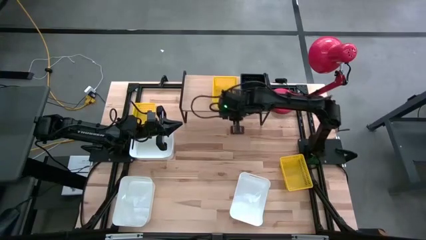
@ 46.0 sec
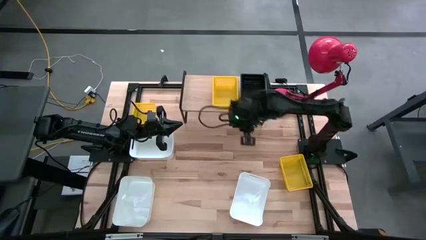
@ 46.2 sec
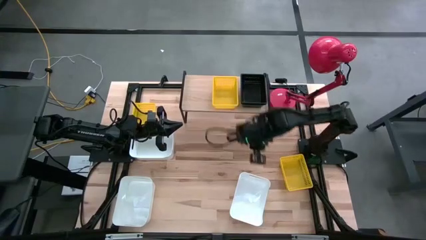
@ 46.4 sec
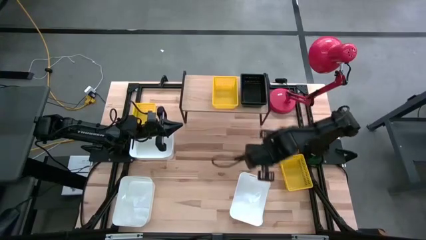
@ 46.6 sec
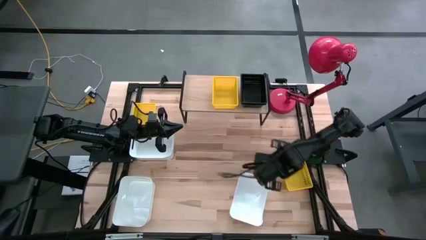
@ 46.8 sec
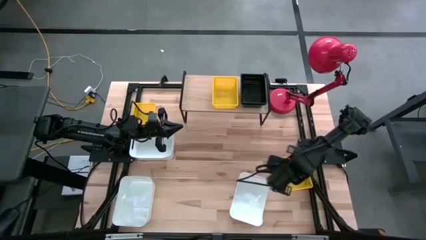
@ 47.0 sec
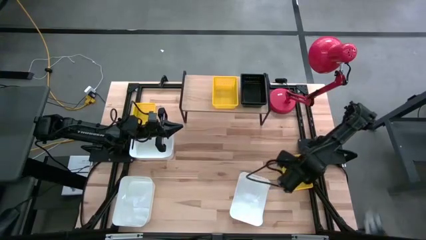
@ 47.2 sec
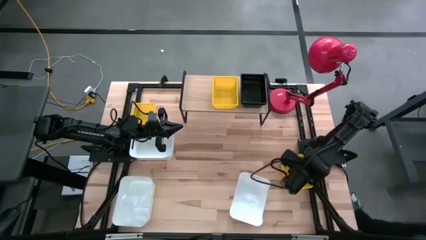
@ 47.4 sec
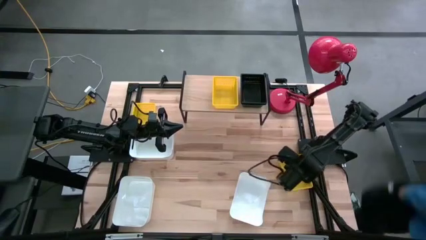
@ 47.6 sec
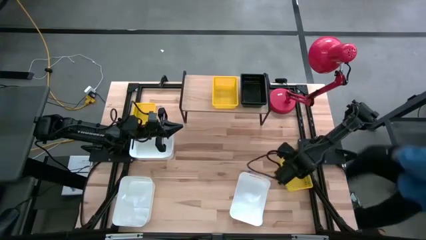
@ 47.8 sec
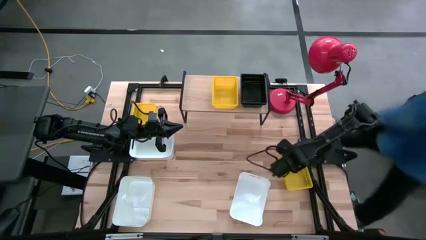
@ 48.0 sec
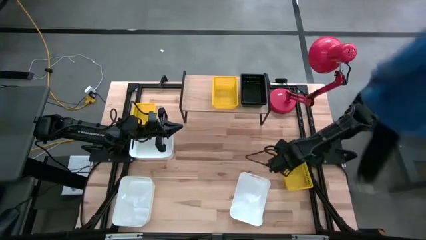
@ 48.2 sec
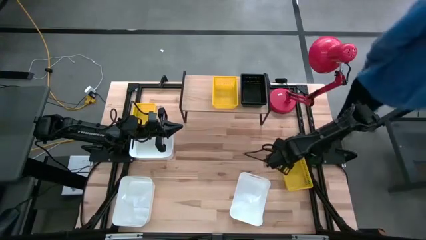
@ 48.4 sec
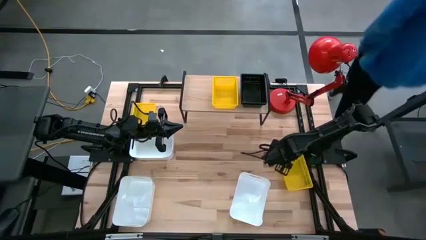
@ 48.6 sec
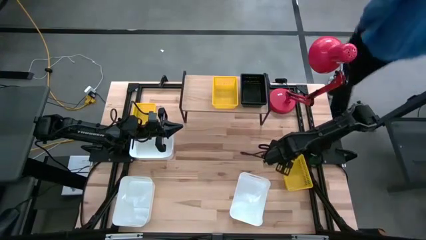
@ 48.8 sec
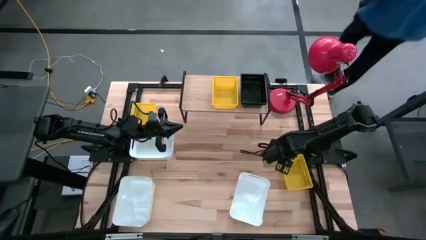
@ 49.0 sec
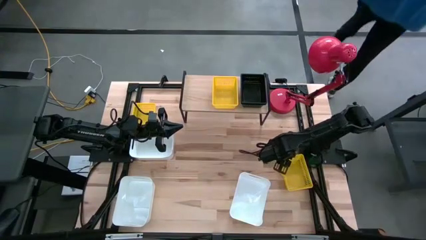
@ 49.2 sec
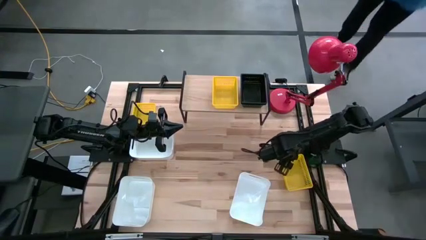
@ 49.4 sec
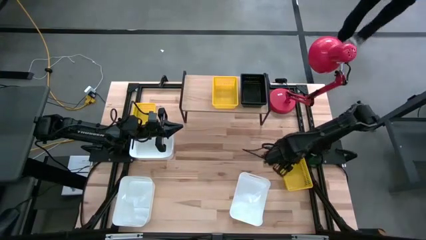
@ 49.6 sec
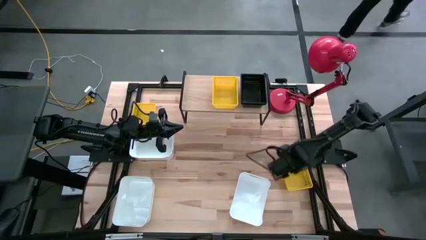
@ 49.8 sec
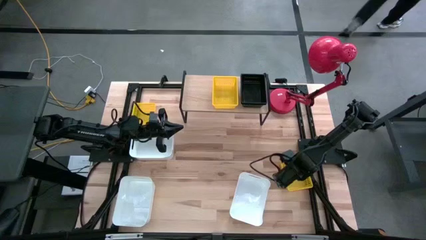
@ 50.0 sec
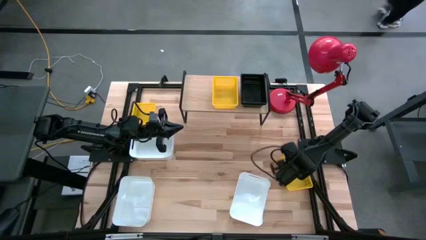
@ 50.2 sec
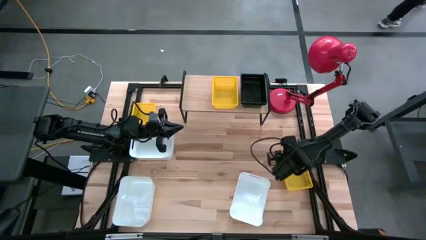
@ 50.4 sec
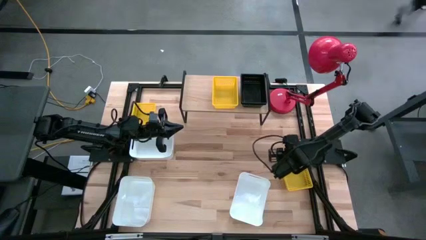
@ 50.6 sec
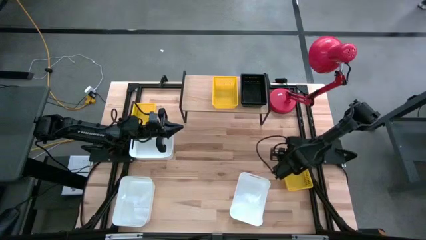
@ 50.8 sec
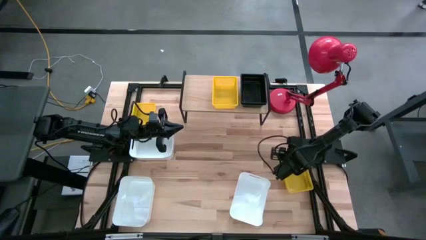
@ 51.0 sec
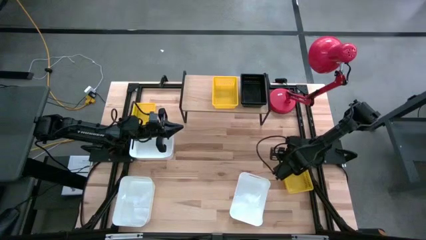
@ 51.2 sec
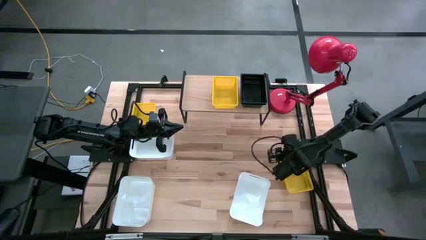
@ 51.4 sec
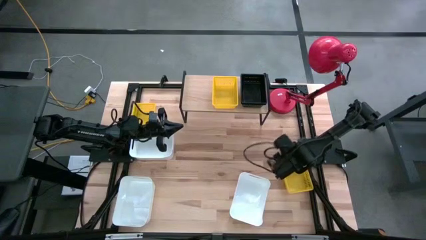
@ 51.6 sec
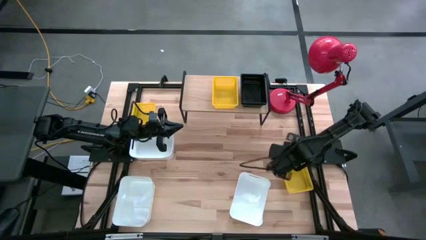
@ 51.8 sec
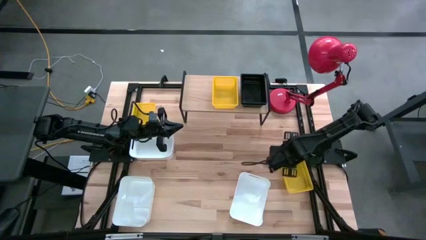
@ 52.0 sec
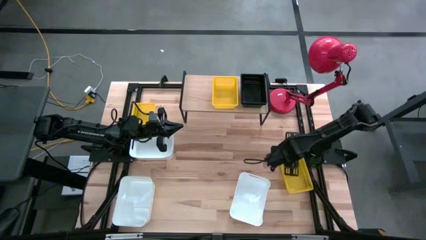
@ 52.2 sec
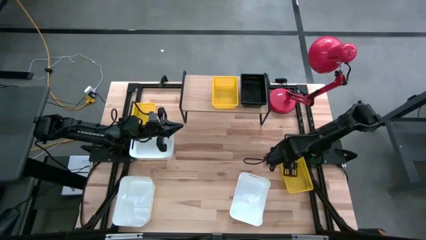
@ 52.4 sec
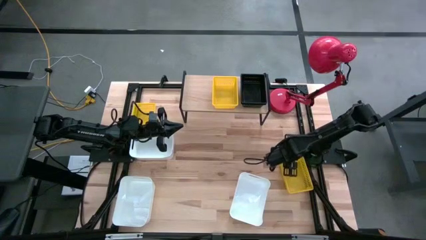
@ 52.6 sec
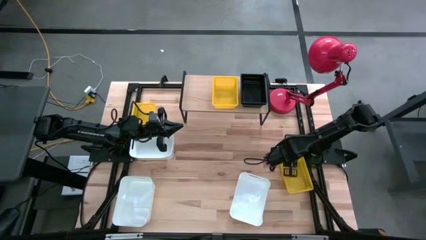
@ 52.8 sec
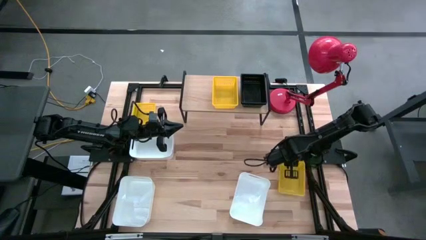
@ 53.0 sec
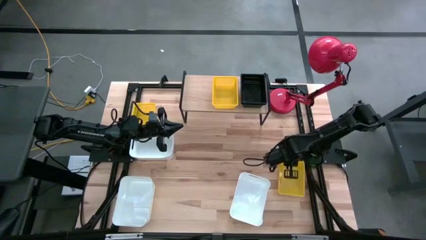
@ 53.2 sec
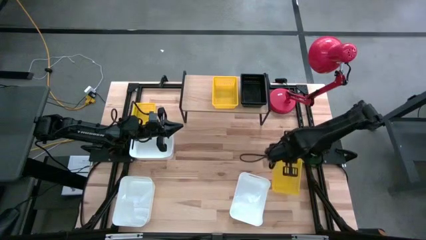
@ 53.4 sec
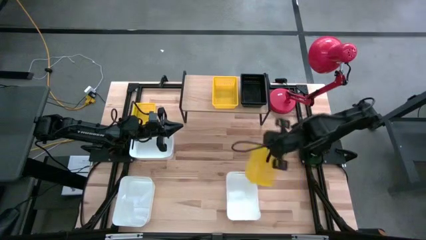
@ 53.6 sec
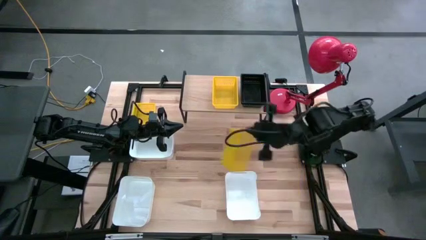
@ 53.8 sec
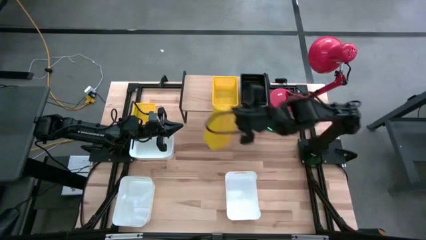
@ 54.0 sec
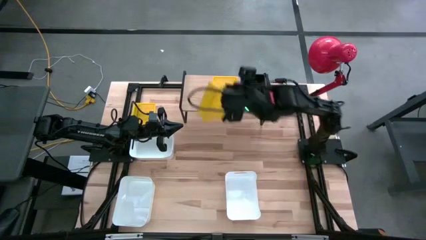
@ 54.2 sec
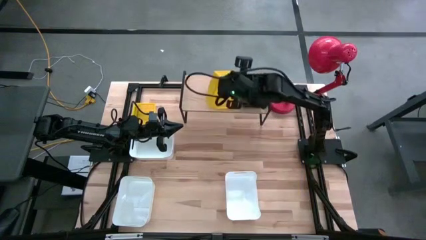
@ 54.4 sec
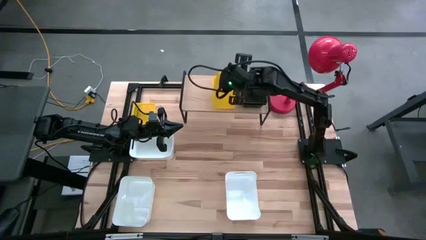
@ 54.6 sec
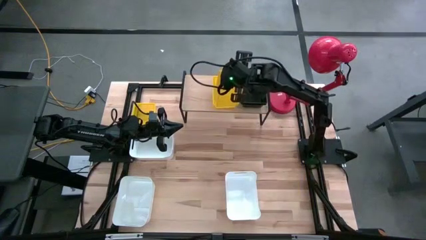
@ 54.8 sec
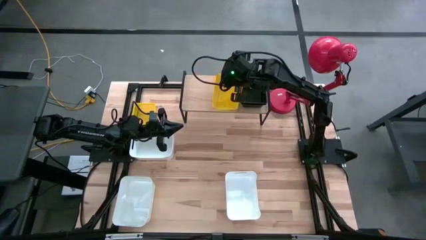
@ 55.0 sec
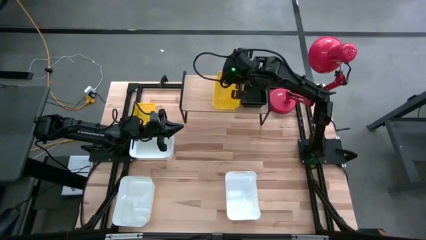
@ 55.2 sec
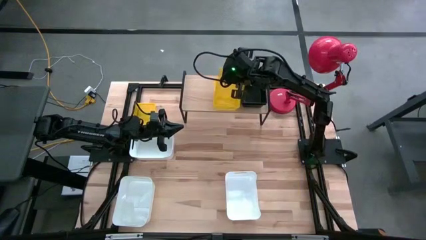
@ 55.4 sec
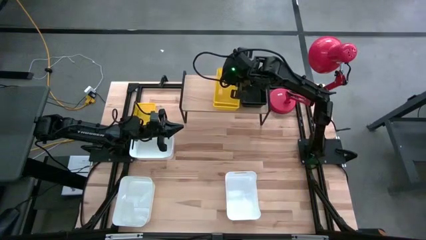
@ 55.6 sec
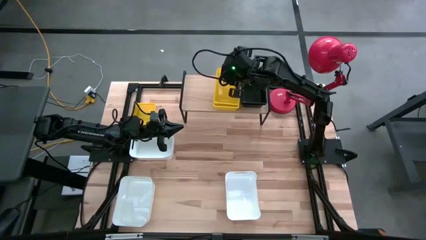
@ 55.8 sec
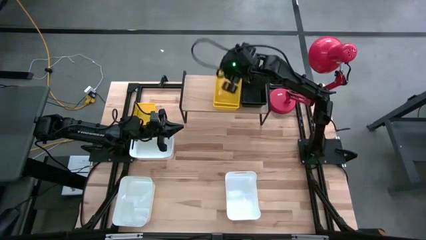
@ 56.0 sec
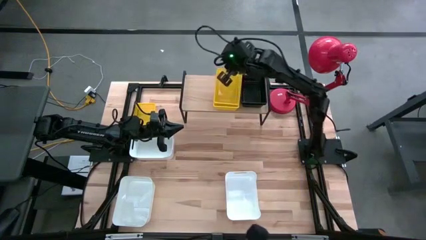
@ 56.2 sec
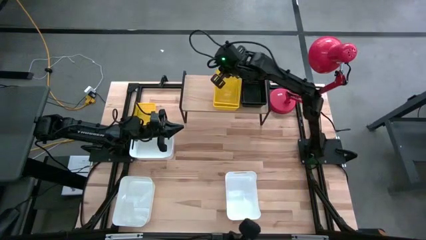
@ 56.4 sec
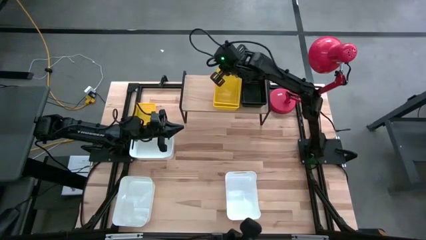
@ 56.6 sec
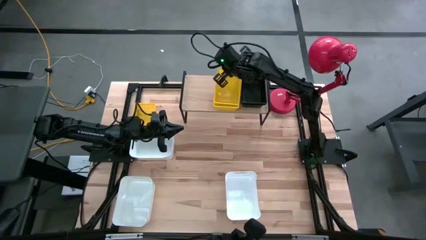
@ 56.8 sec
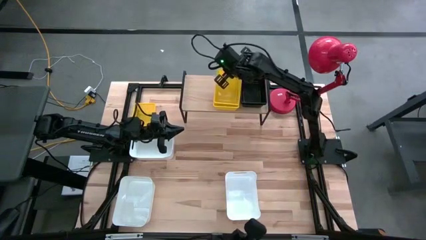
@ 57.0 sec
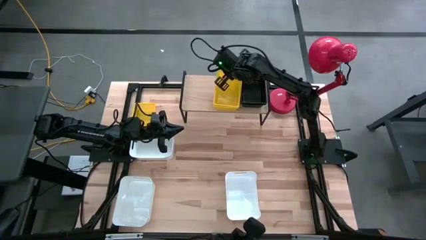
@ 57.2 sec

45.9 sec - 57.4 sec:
Task: Stack baskets on shelf by color
Stack the right yellow bin on the other yellow bin on the shelf

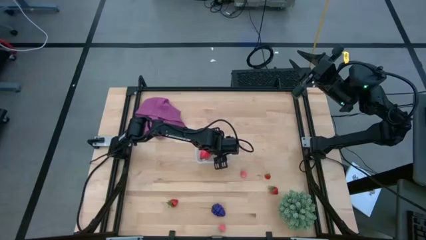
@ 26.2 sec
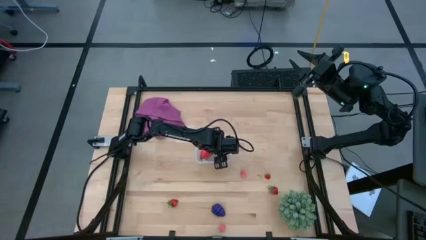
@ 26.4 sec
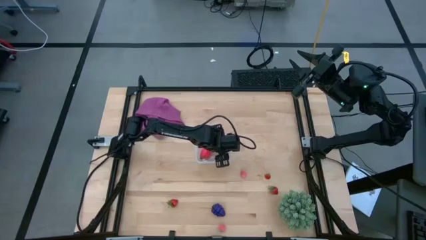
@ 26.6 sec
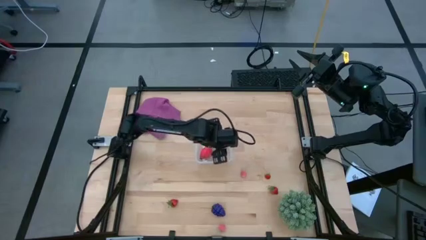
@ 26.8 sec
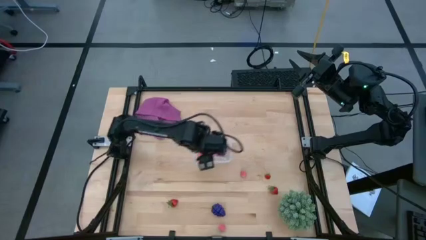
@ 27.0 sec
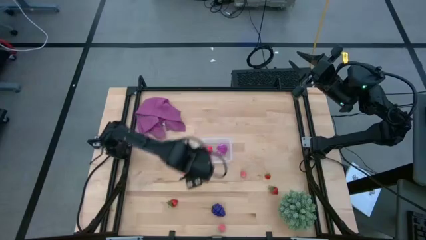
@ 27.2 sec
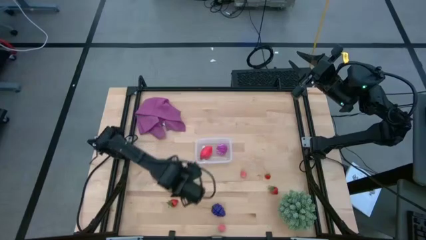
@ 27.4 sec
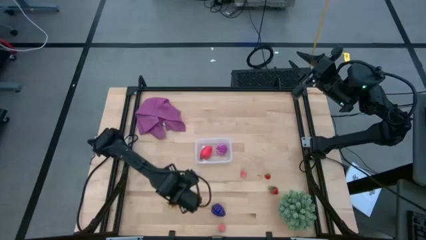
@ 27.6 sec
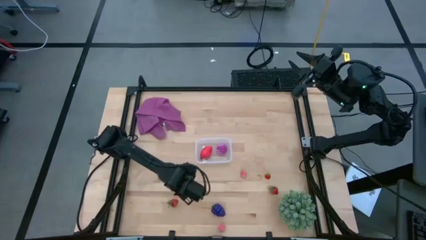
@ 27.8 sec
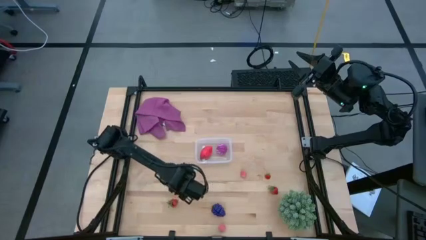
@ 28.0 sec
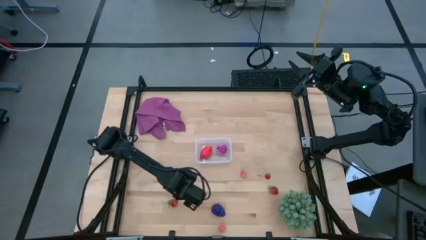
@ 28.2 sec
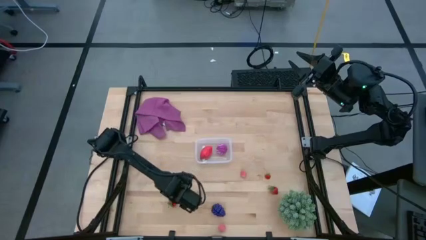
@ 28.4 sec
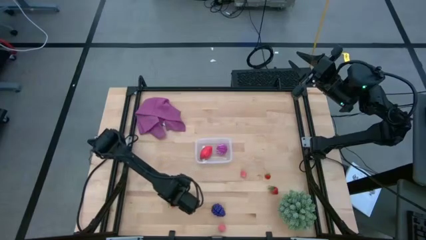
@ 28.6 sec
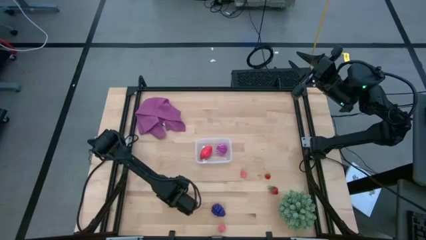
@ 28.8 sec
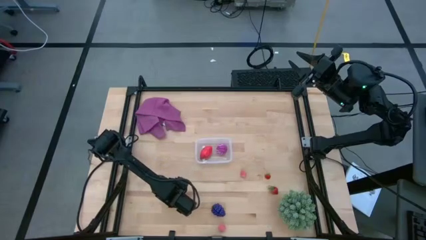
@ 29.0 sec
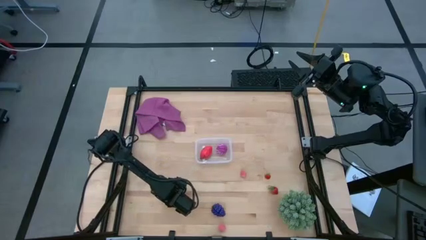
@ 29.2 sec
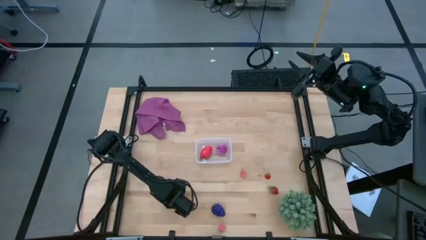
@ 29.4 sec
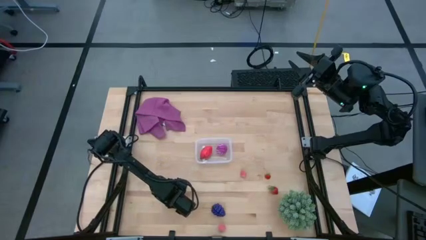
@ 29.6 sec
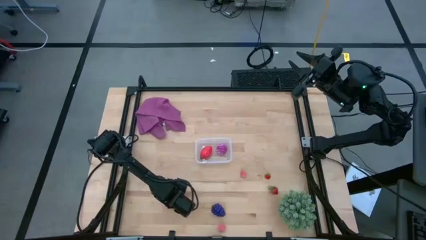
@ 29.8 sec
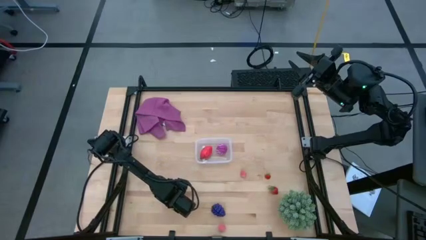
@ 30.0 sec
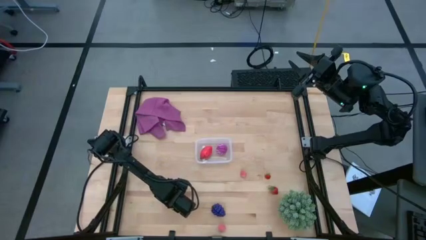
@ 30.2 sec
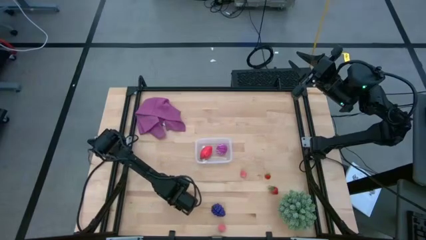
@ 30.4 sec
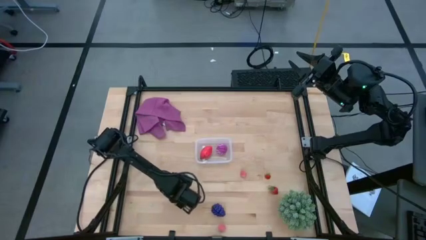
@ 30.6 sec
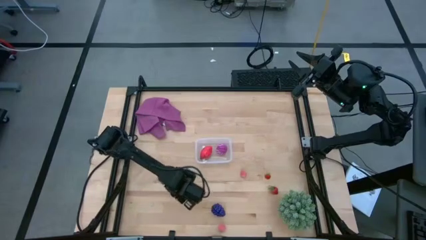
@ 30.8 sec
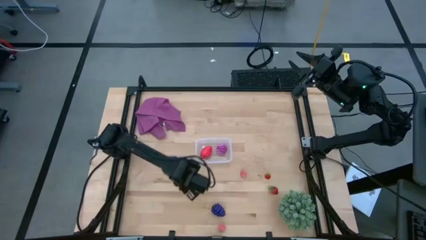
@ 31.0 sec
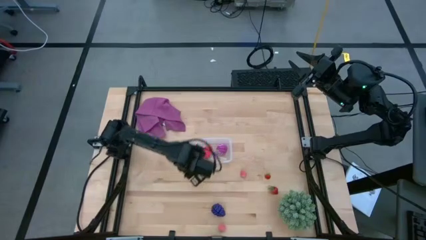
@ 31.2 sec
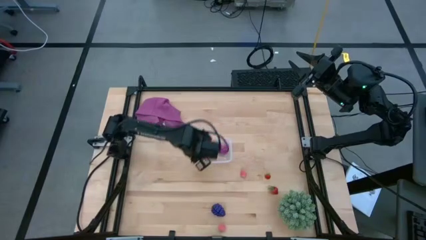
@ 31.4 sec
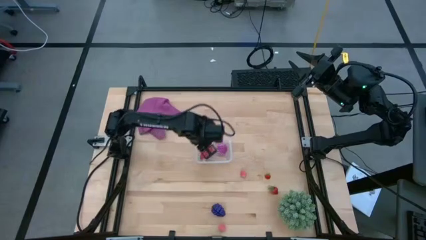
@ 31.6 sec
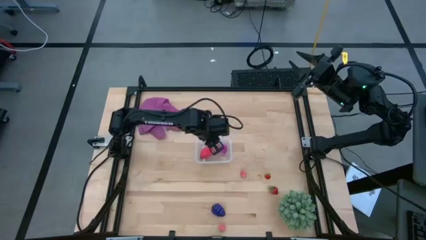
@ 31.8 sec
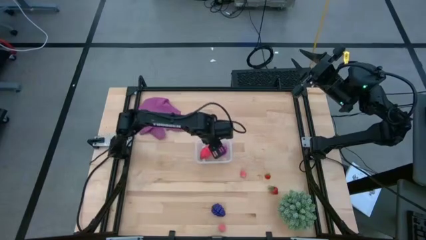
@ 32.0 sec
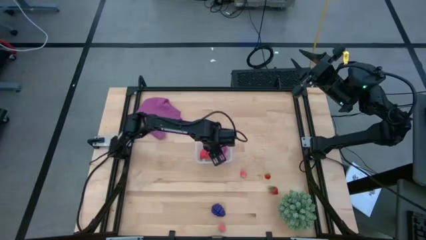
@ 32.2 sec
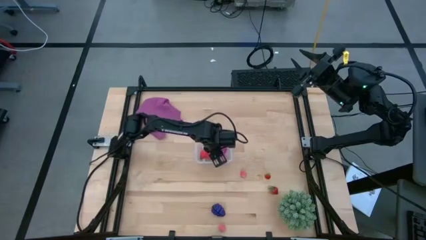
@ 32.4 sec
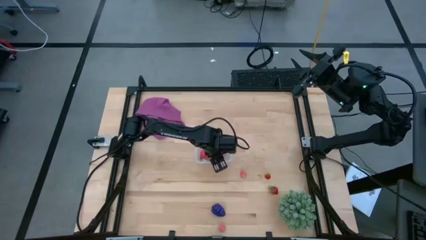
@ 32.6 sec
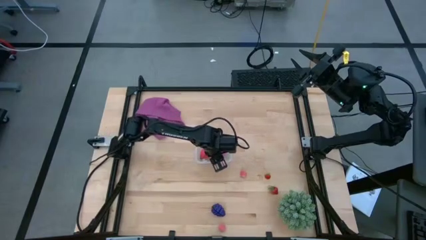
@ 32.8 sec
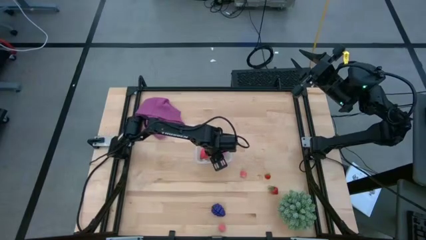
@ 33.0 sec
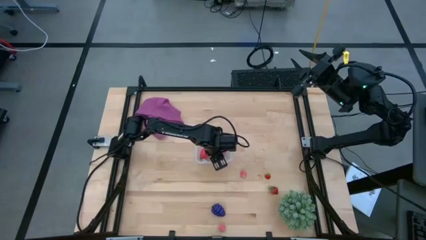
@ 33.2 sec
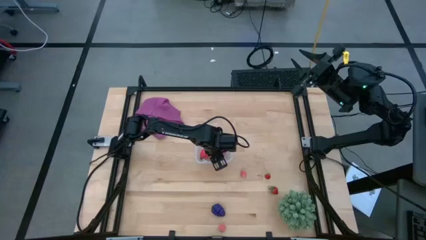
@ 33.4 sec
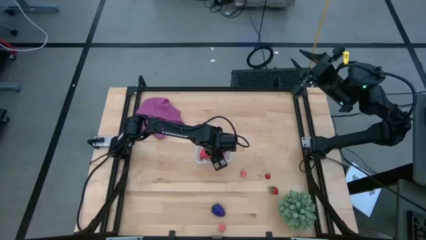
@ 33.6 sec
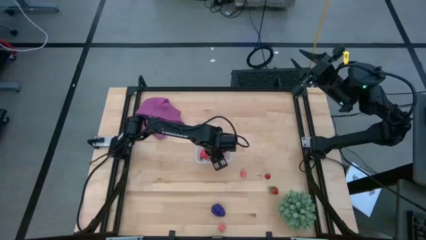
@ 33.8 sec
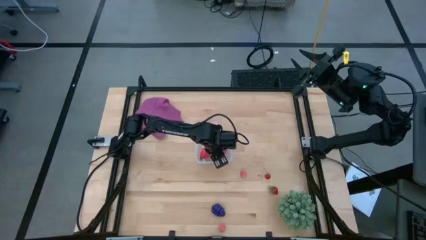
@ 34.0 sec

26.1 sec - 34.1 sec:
Task: Pick and placing Produce into tupperware
Put the bottom left red strawberry into the transparent bin
